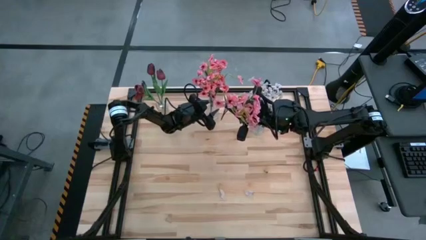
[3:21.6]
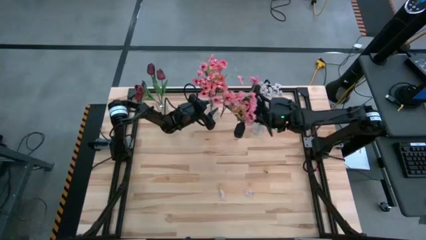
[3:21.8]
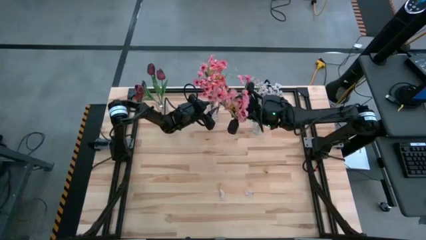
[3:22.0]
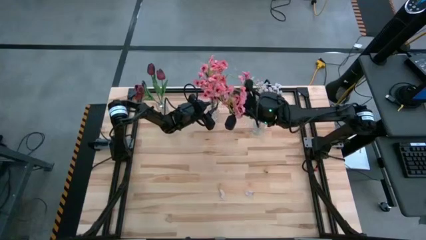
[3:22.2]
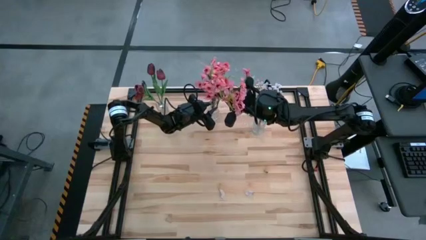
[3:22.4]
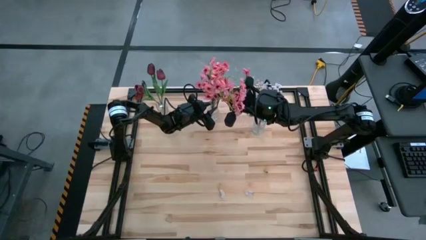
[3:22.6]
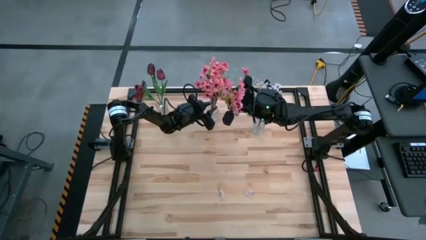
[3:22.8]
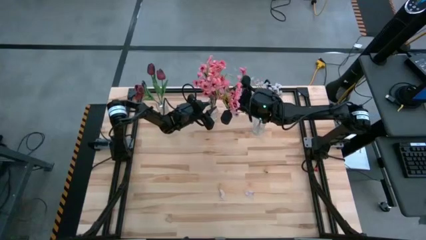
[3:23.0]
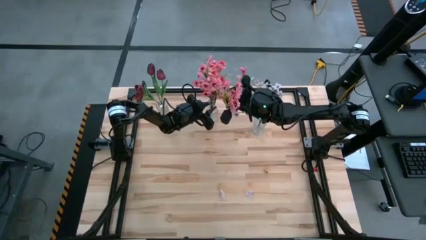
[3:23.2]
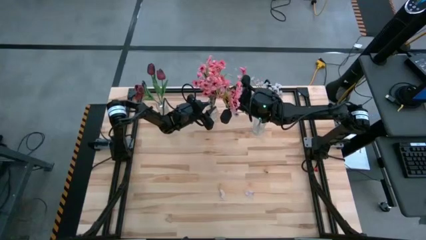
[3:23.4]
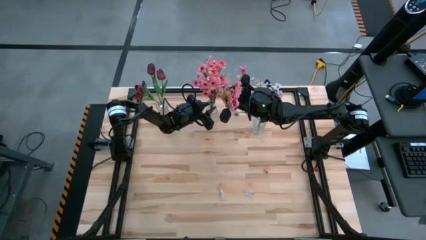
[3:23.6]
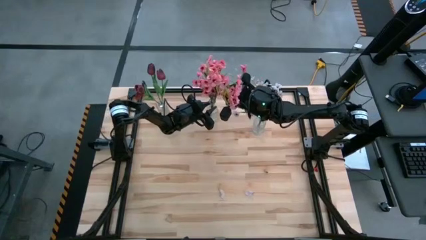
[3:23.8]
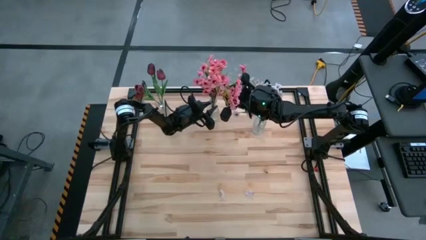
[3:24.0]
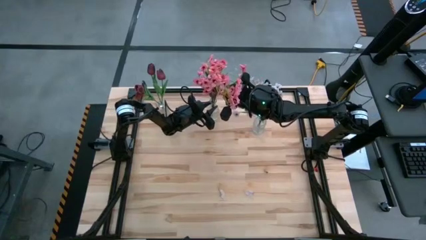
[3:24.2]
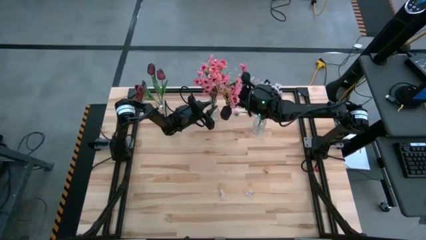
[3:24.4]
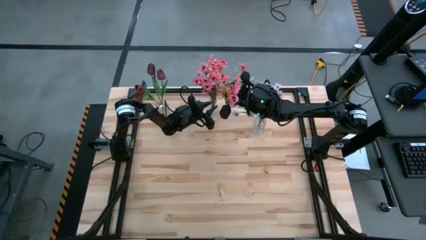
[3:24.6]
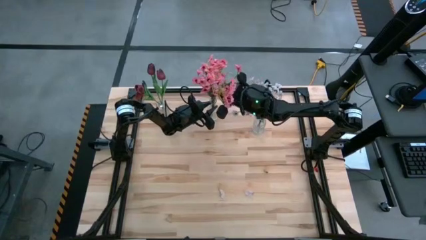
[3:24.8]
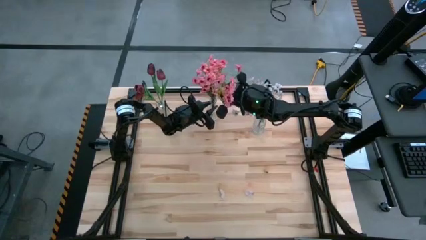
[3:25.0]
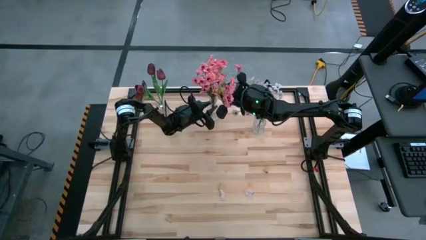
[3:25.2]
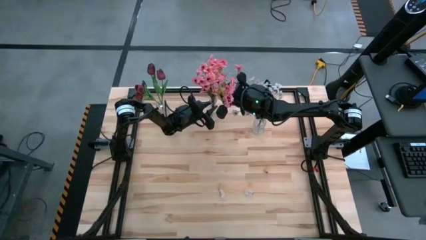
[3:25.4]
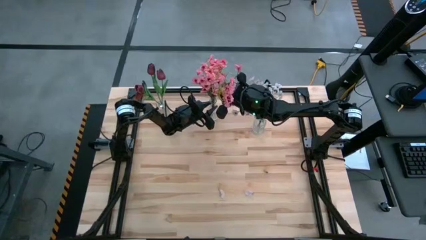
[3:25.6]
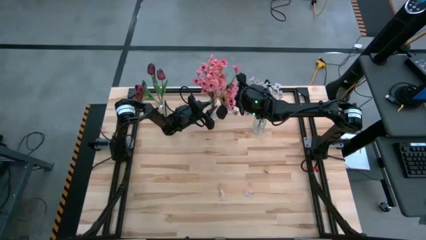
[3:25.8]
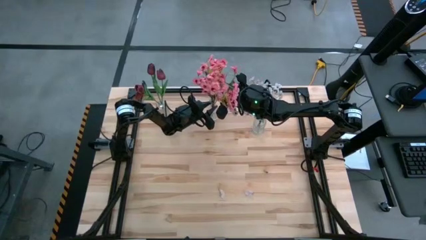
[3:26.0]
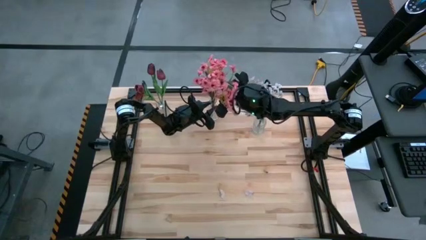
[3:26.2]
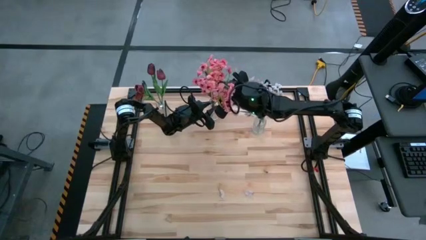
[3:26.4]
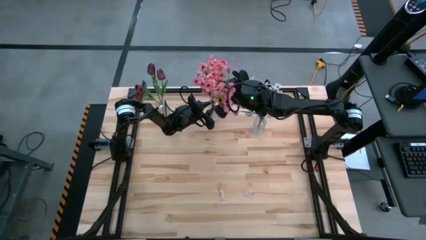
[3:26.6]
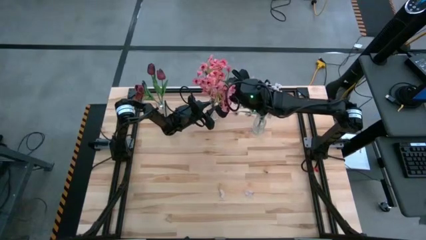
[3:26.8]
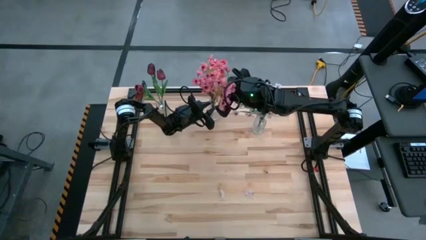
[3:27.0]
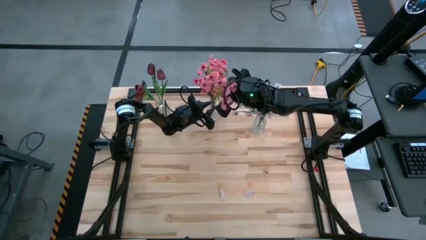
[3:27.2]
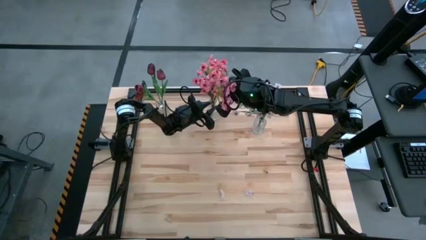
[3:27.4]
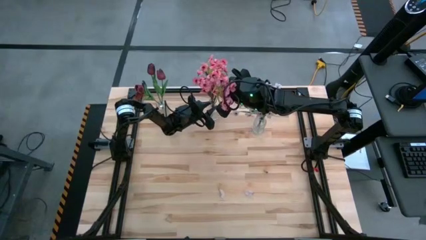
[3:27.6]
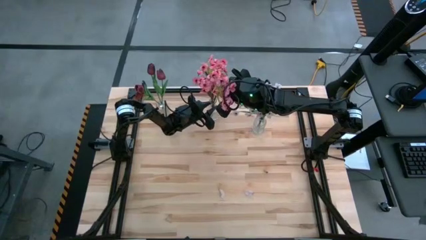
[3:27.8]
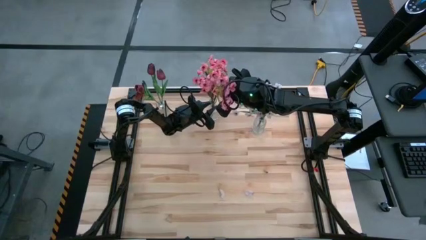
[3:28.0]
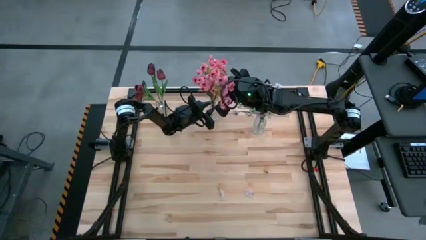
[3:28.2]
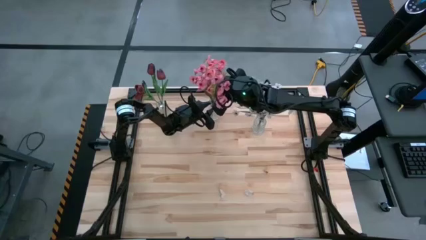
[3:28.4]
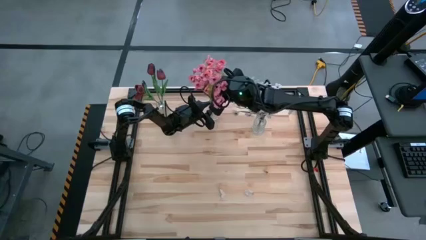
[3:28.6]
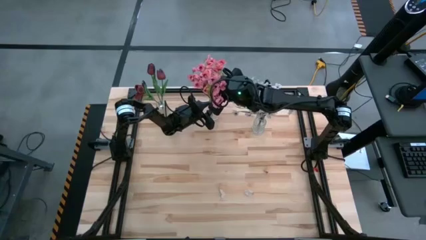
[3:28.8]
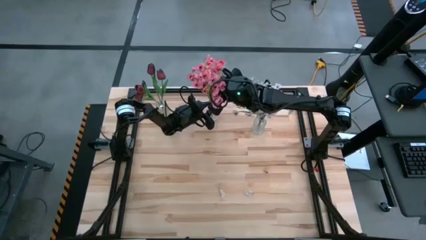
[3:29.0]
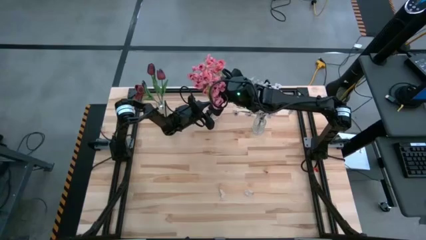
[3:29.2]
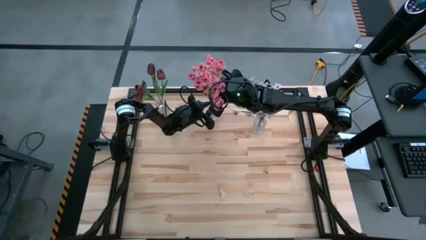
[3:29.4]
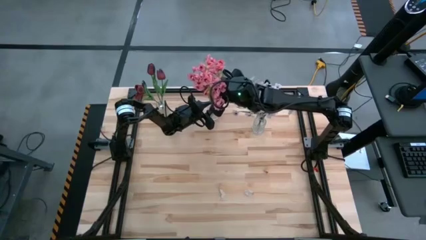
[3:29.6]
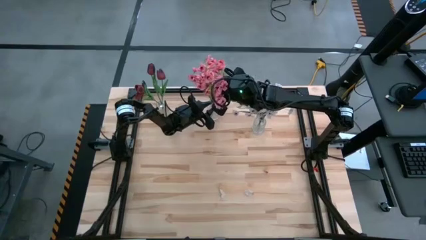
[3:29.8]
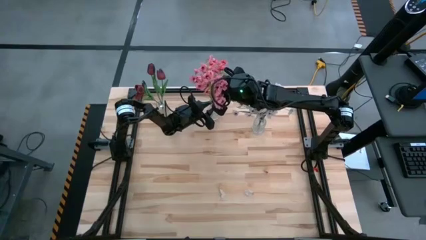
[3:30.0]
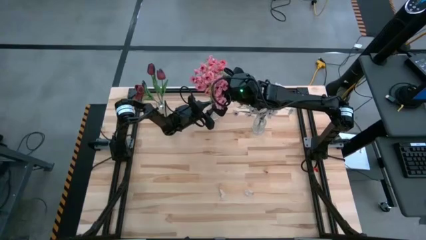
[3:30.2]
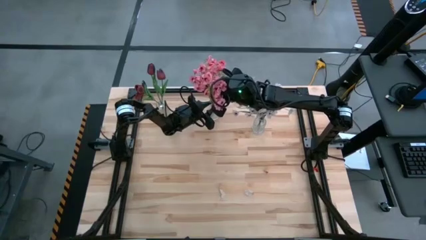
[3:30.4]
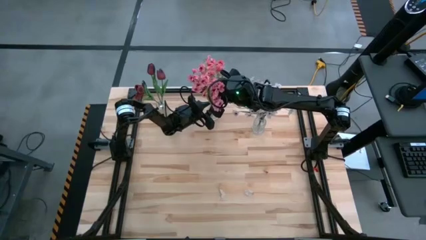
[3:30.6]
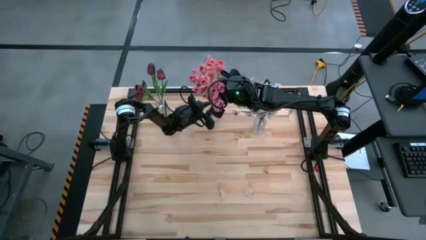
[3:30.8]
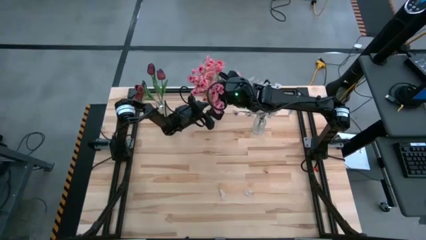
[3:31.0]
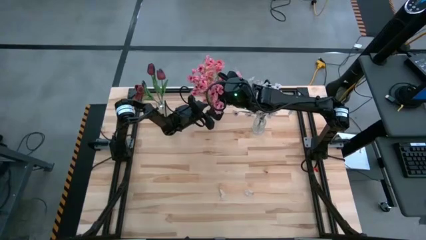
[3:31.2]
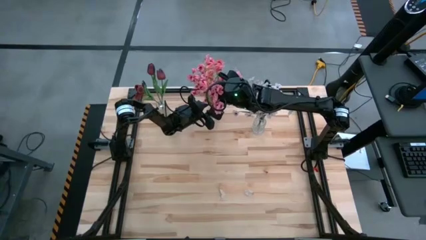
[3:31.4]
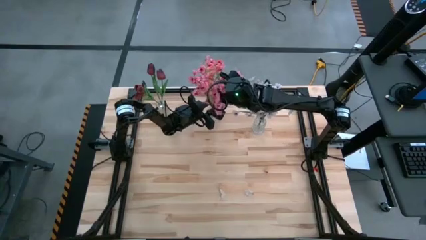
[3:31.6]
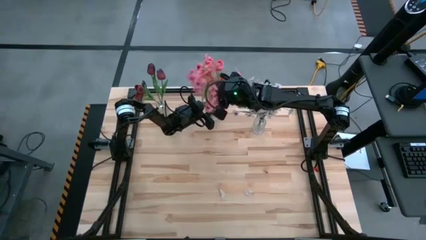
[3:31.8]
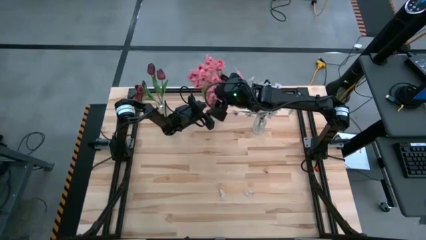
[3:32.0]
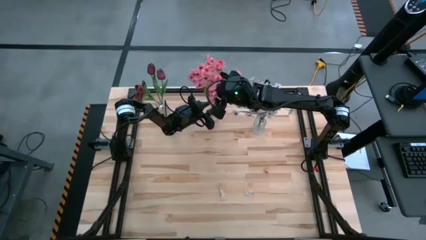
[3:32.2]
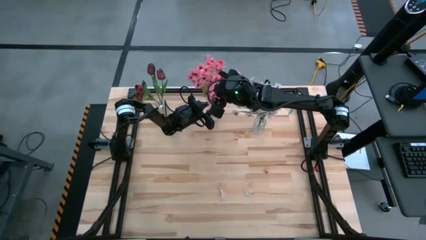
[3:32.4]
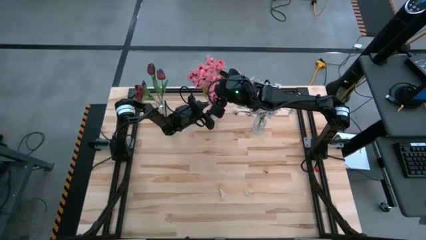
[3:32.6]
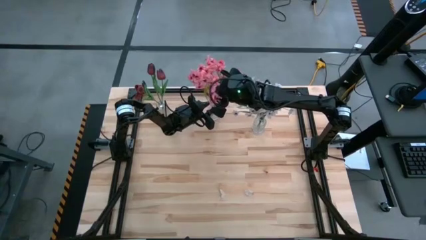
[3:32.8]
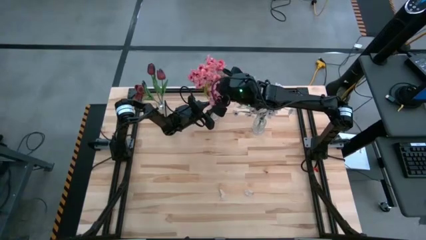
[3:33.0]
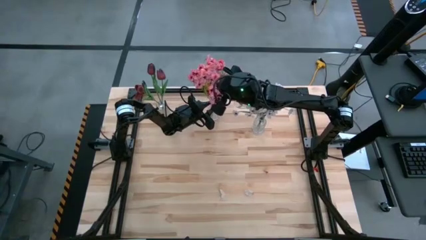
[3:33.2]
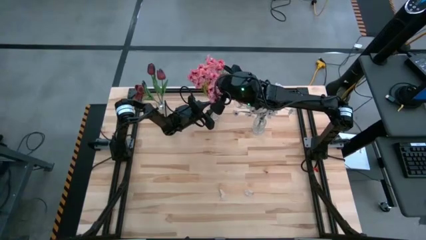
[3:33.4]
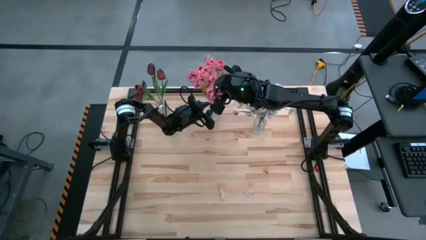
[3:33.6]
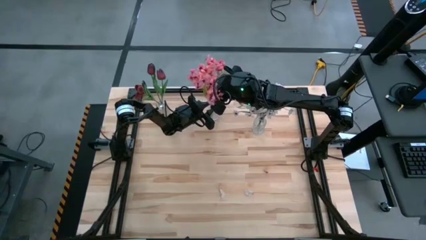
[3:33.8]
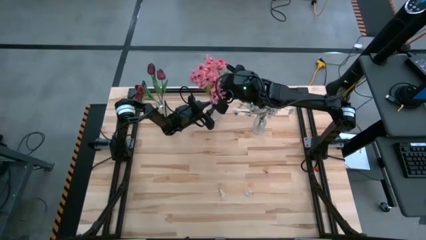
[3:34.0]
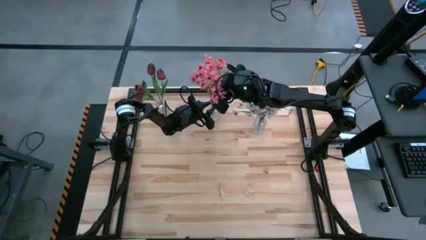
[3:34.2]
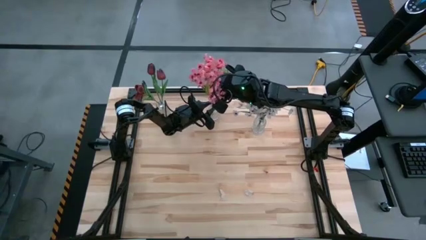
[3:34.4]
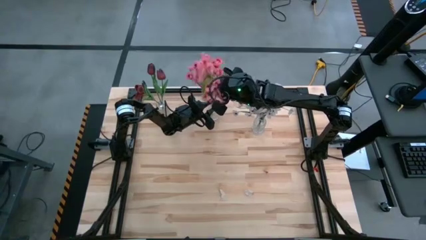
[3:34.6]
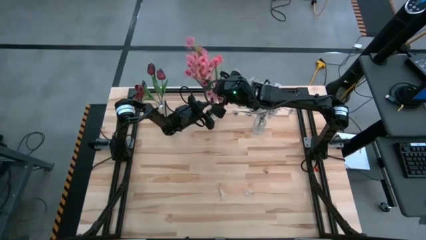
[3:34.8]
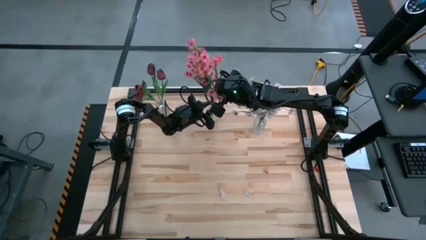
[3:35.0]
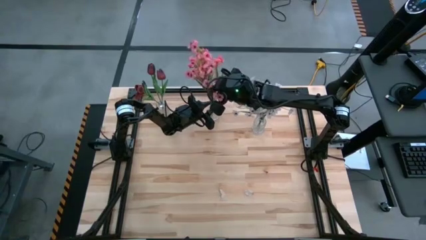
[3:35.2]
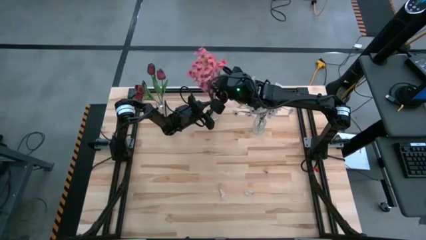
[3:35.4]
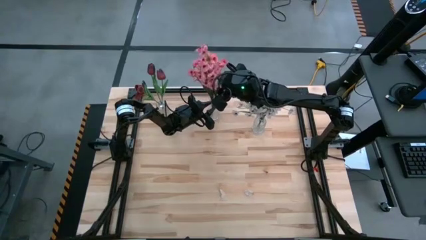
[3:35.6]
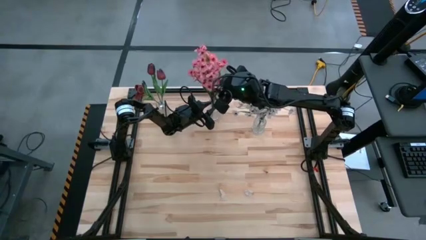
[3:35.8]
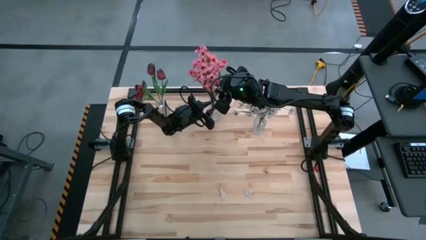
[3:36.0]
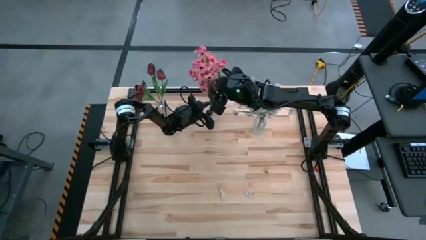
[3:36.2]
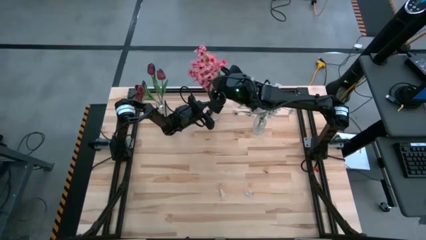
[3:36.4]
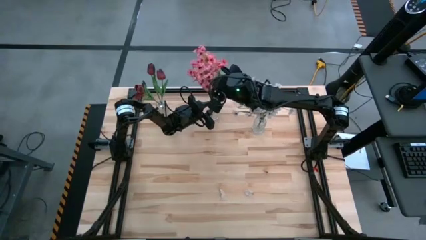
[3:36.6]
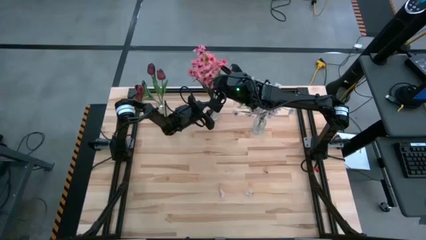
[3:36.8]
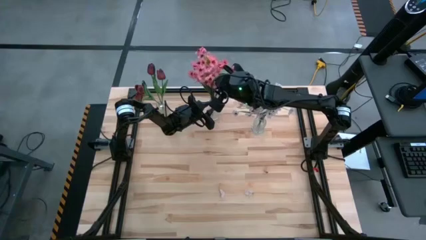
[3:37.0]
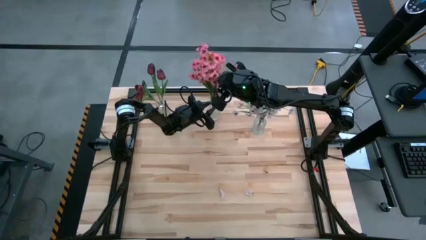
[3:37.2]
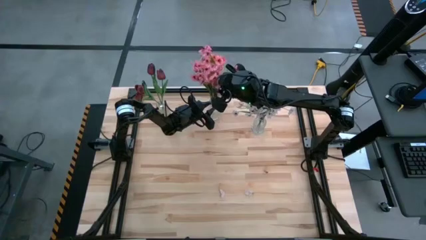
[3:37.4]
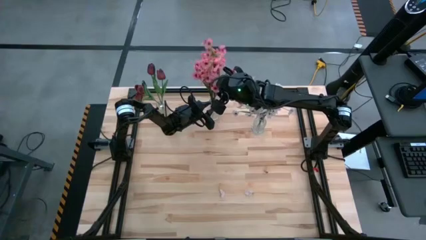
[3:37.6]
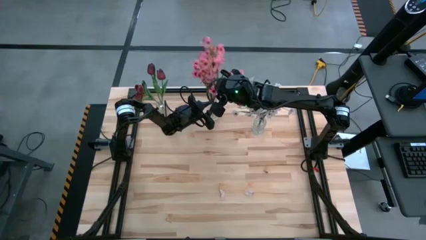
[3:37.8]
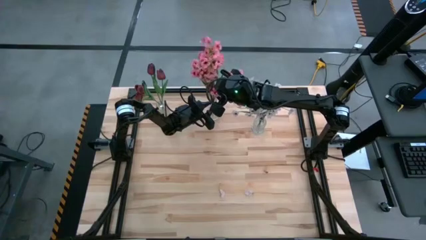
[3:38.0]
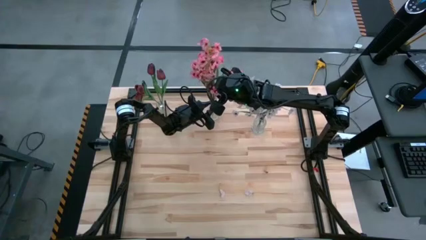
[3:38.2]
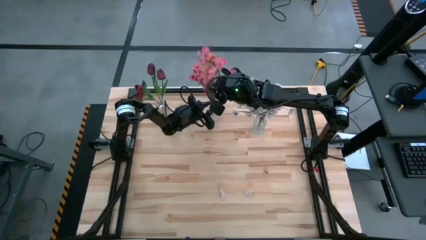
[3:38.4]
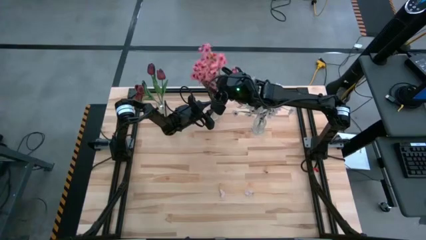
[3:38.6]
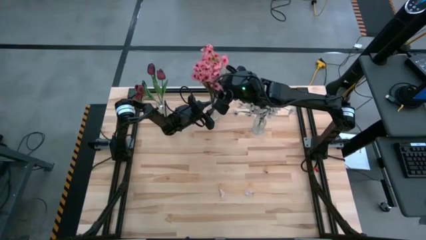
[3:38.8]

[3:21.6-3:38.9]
Task: Sort flowers into vase by color
Put the pink flowers into the middle transparent vase
